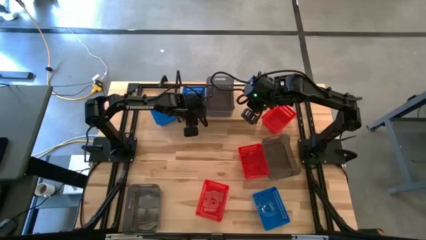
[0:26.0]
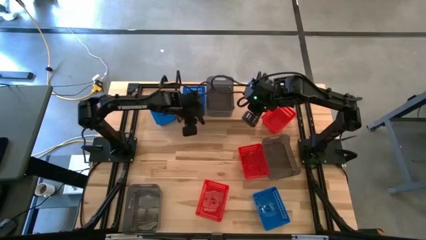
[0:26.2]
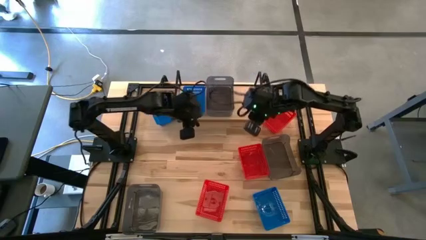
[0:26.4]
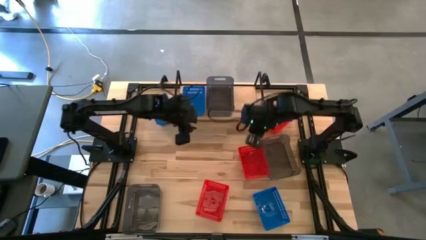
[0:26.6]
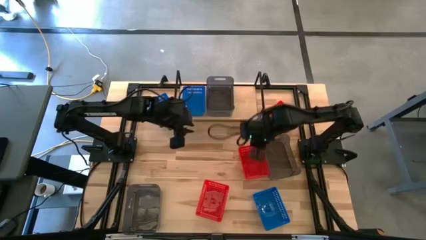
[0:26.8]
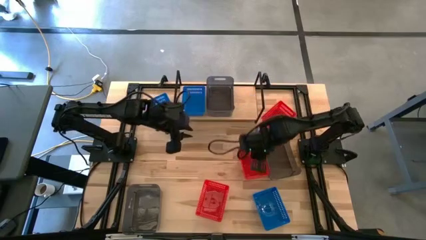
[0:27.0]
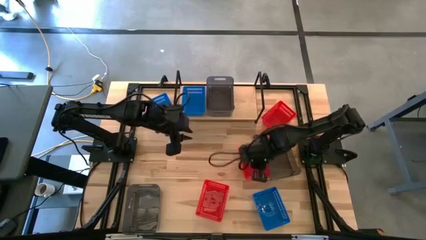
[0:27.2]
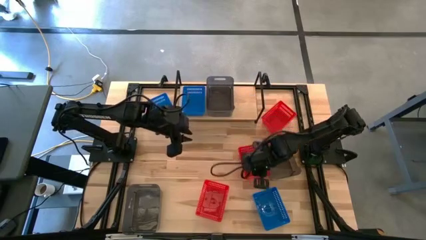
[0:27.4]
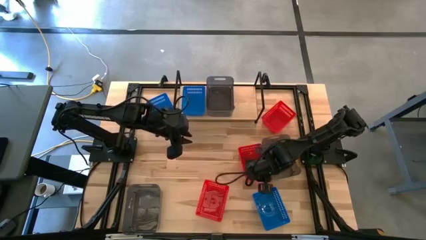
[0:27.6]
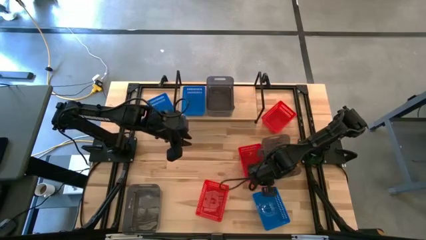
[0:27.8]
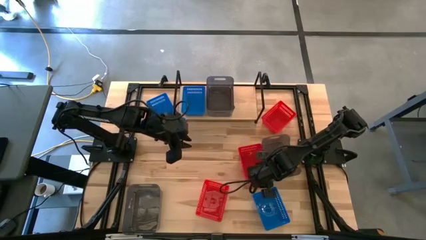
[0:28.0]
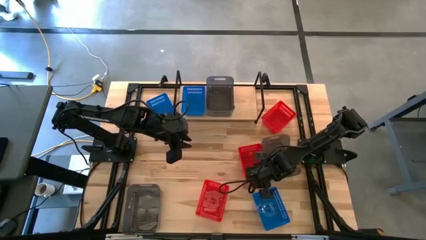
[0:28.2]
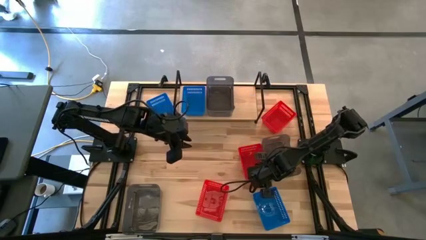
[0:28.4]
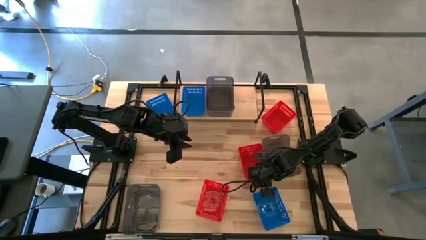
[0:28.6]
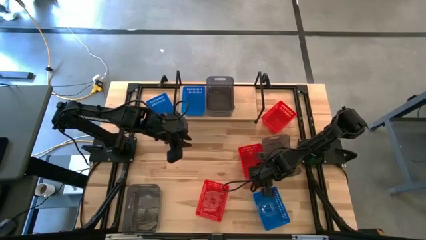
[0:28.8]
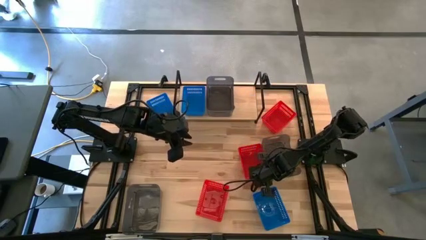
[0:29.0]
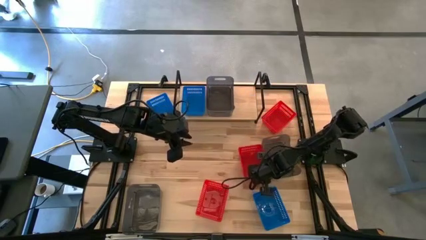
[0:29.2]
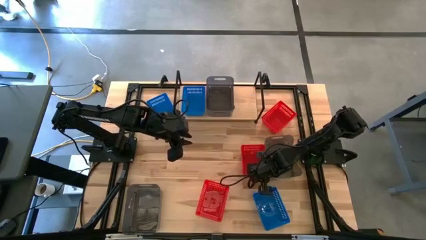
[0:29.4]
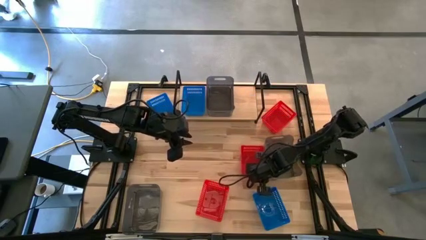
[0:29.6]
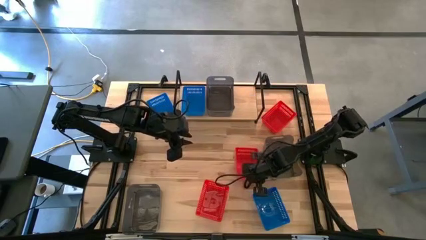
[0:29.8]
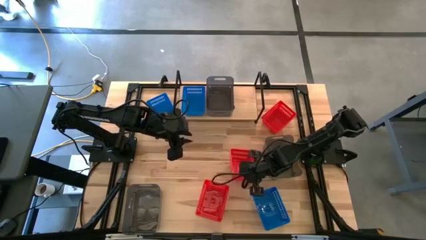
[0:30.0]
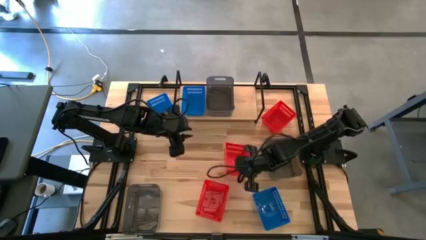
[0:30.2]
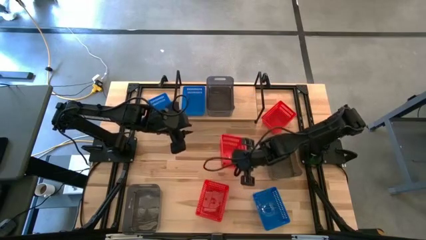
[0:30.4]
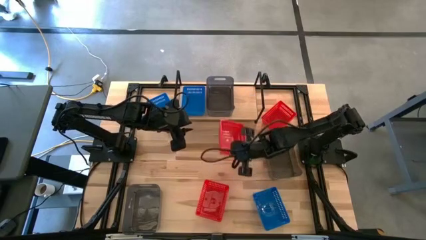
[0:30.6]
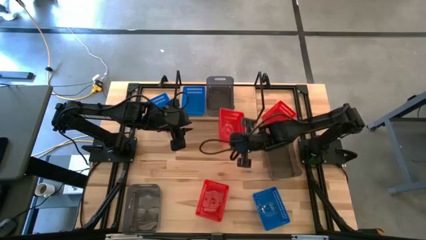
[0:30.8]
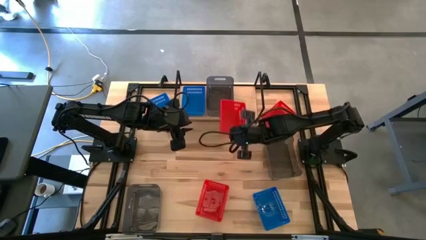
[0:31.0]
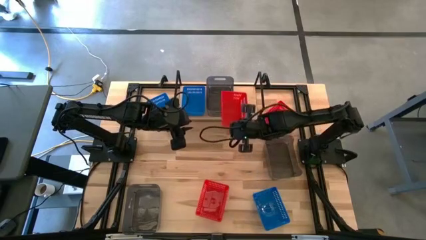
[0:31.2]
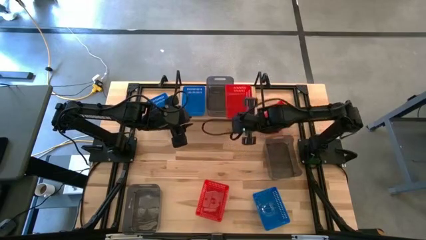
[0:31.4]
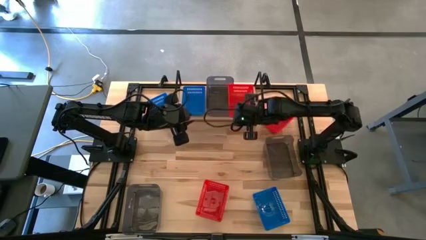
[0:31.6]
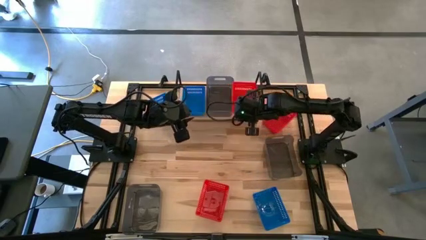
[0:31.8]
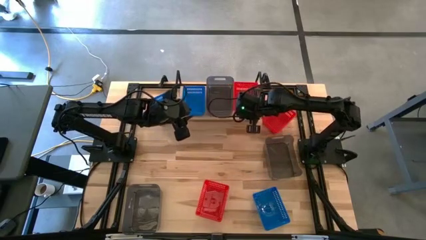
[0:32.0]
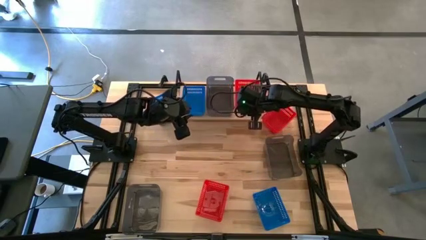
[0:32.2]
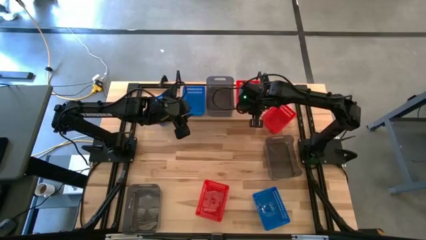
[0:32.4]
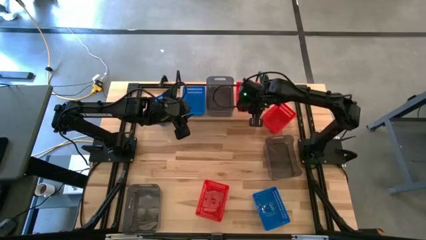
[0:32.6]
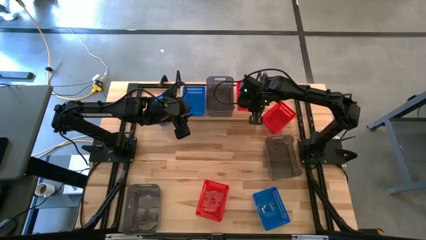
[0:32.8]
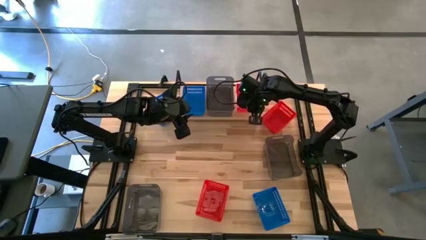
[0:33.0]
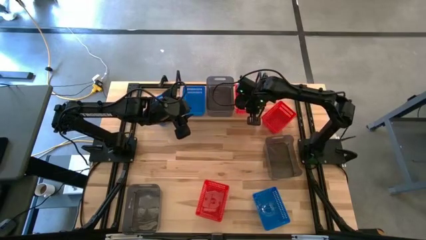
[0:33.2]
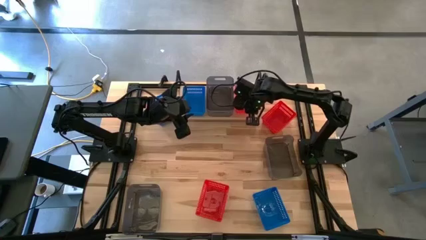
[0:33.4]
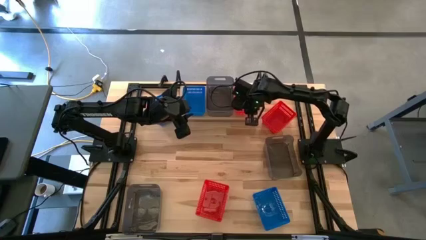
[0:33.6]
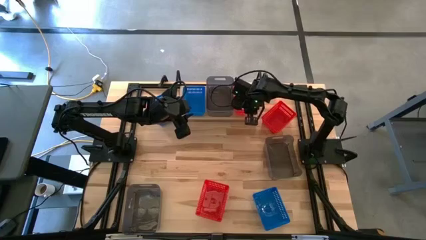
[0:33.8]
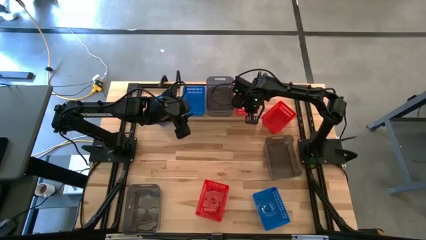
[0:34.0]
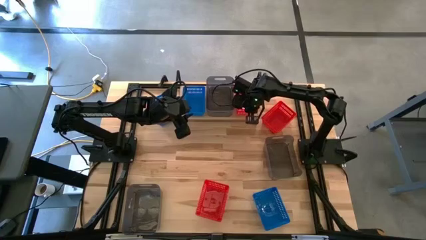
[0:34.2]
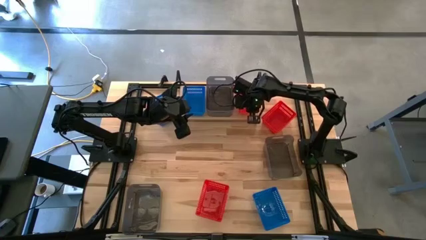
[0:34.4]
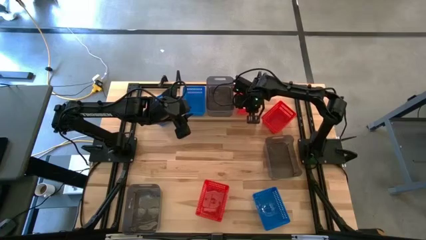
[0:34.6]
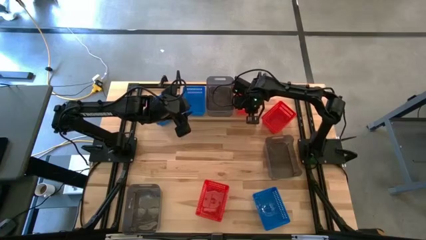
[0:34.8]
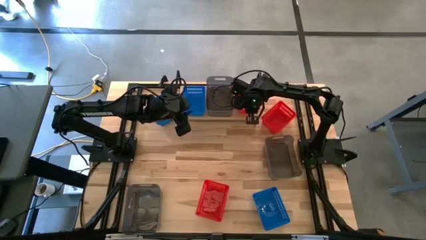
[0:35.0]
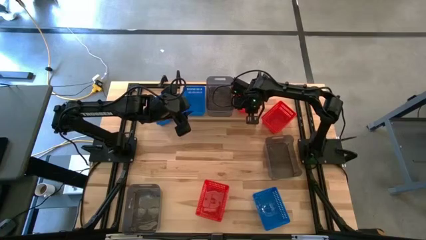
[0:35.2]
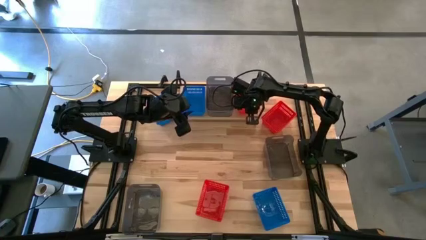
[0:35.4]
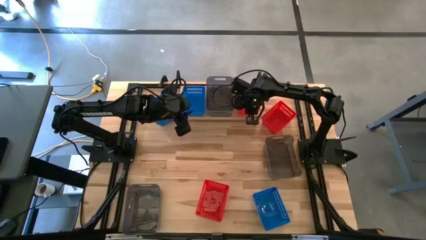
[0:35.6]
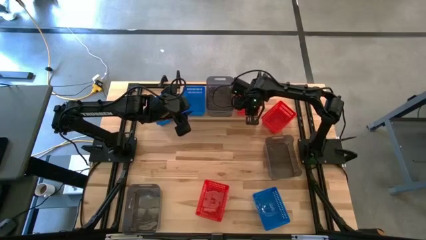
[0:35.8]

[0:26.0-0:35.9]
Task: Stack baskets on shelf by color
Put the middle red bin on the shelf
